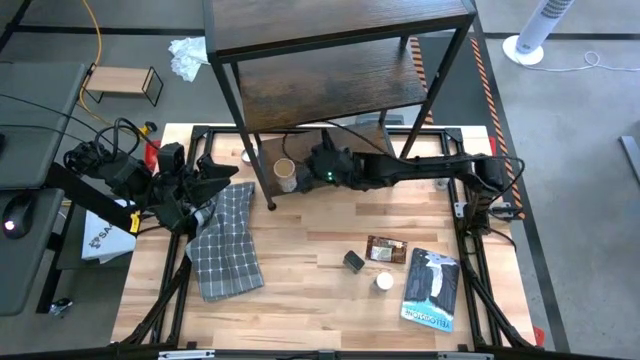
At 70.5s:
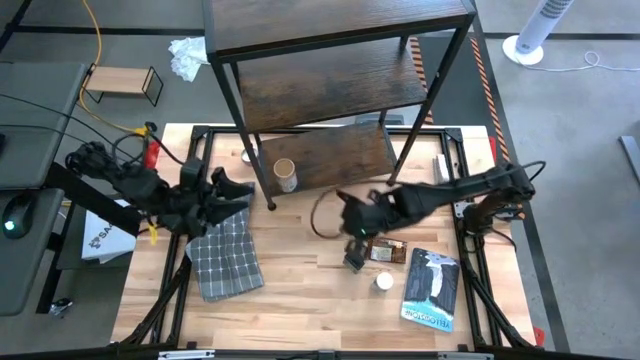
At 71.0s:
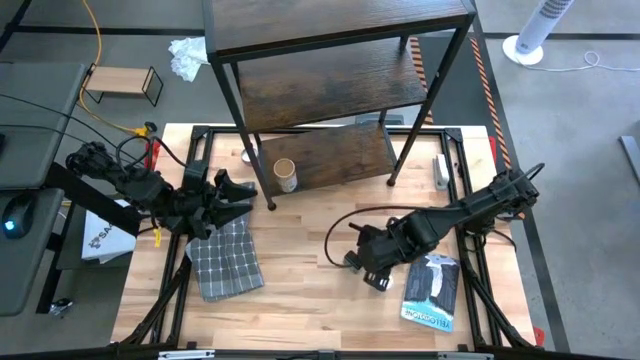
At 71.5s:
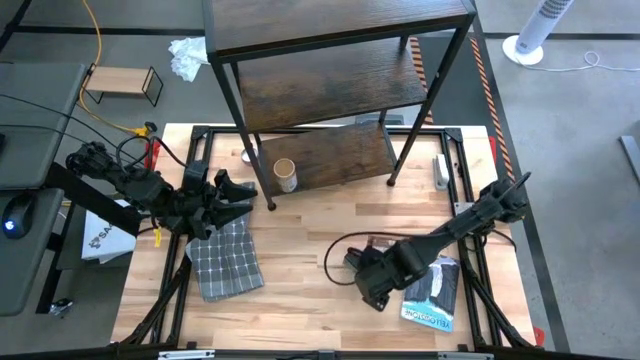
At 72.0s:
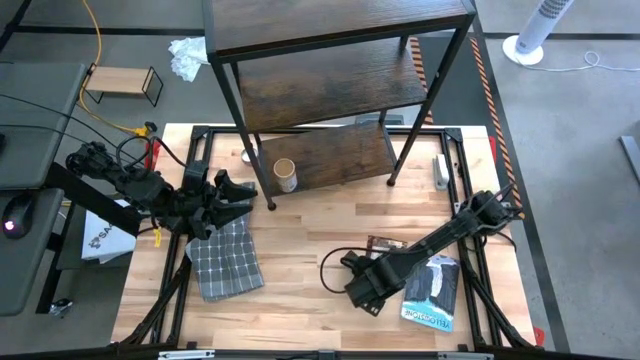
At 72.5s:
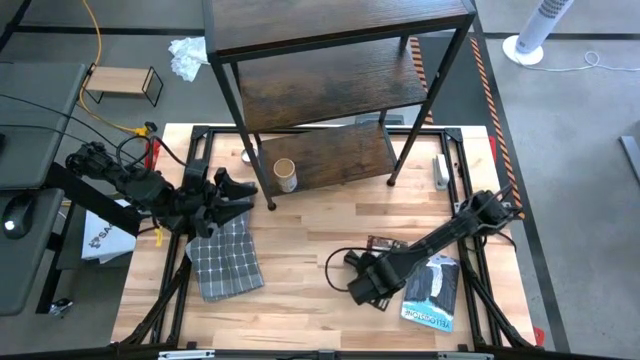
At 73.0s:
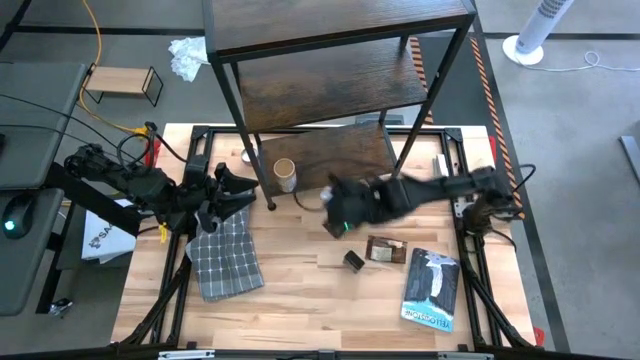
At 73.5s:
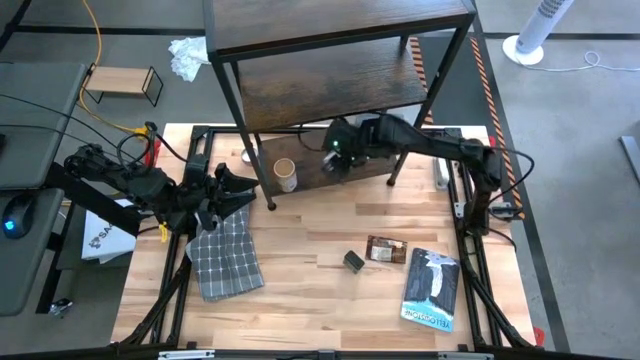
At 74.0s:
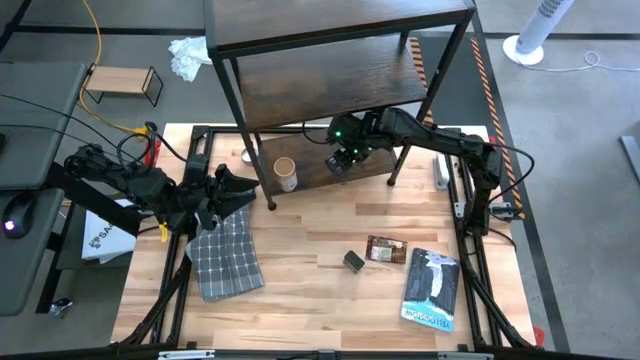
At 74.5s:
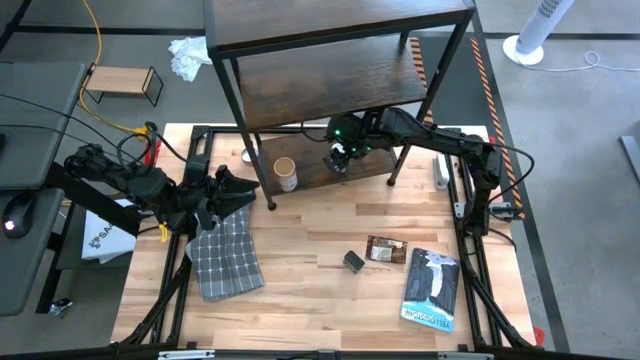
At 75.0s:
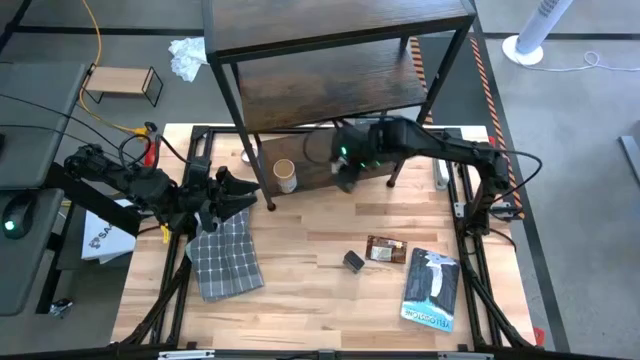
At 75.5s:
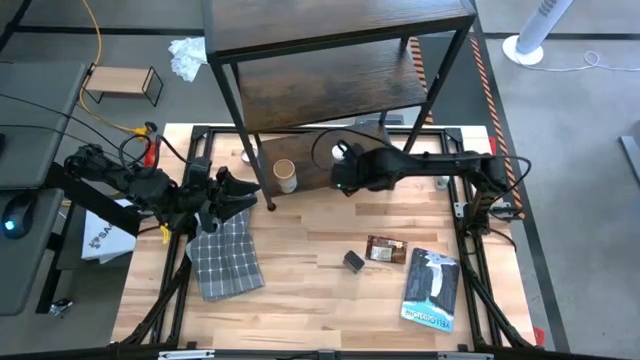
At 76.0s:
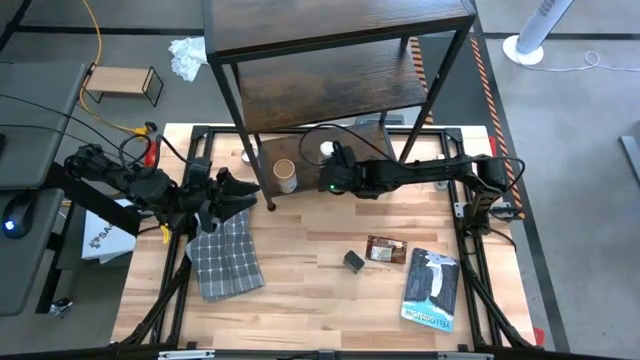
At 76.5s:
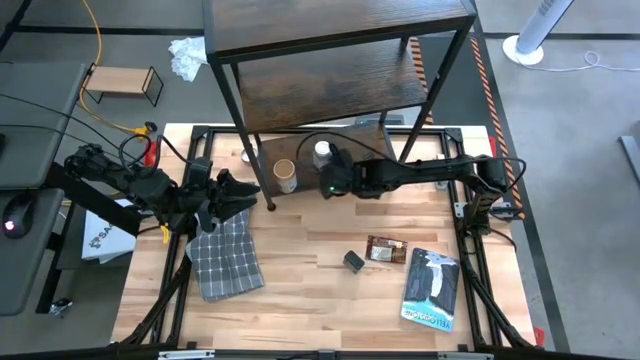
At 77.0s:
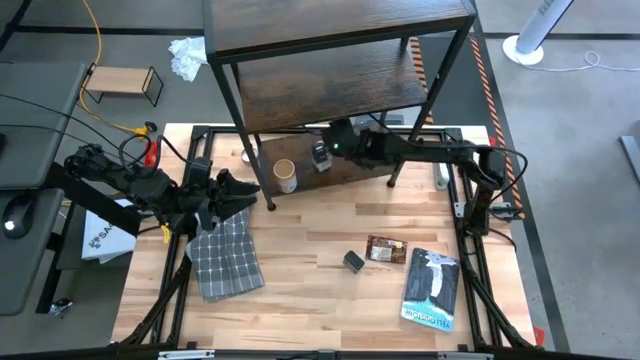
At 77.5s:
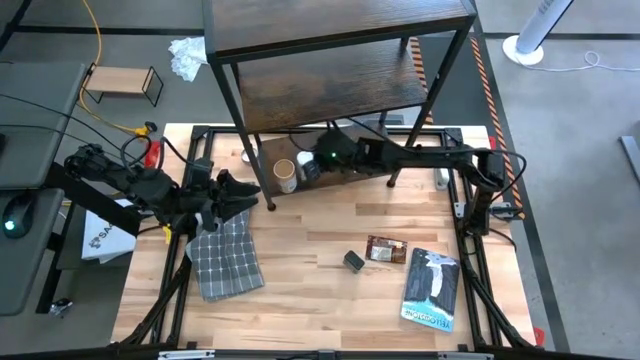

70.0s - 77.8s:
Task: Shelf spices
Put the white seasoning bottle on the shelf

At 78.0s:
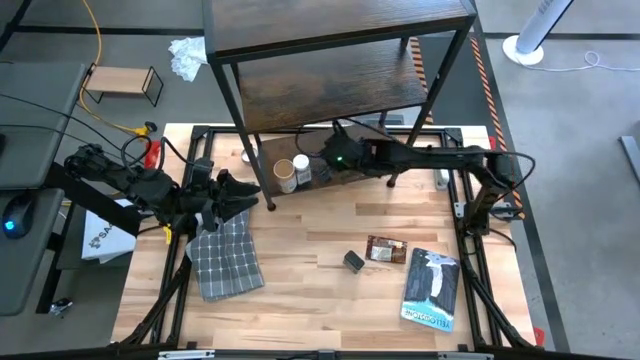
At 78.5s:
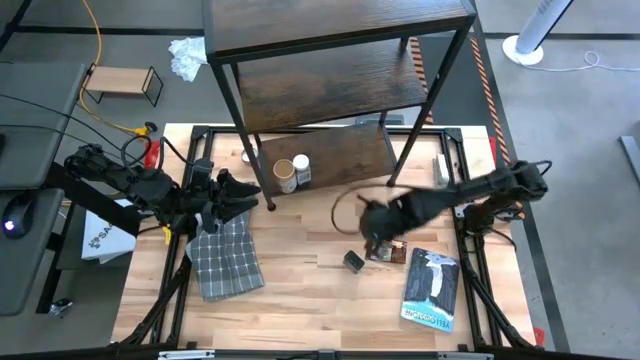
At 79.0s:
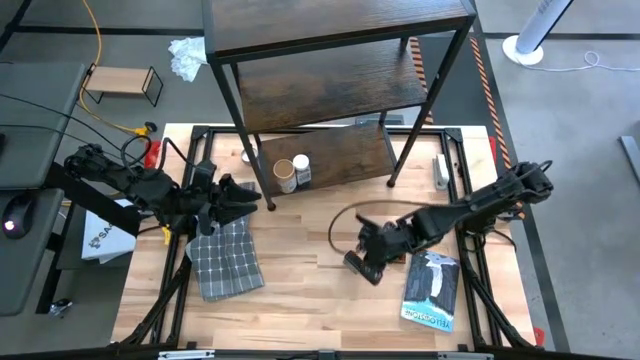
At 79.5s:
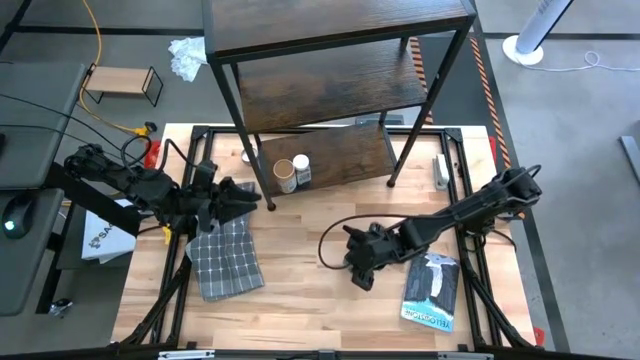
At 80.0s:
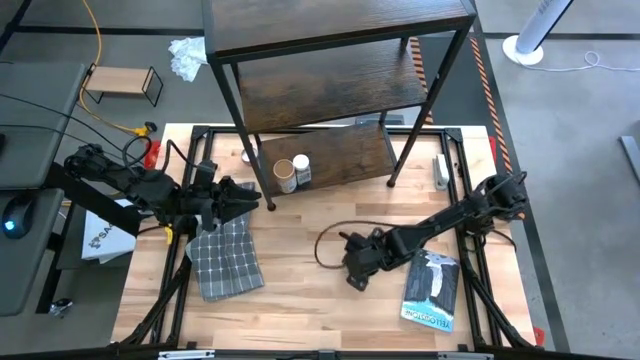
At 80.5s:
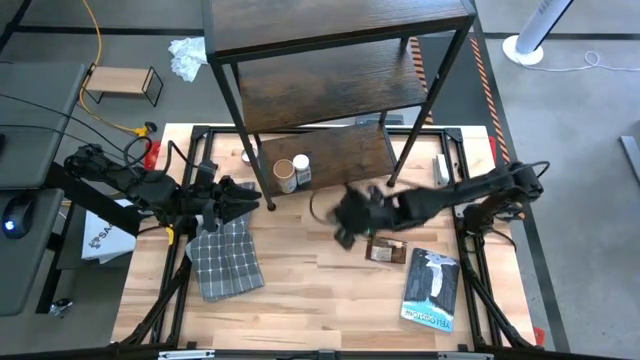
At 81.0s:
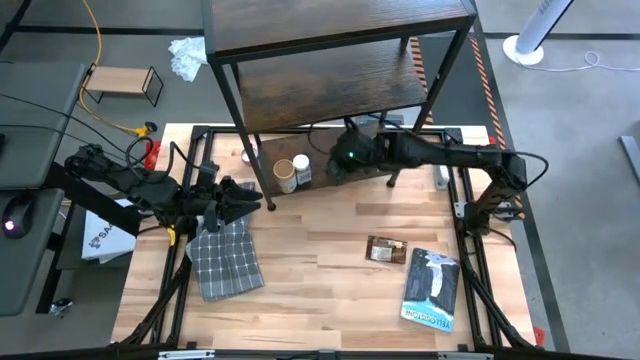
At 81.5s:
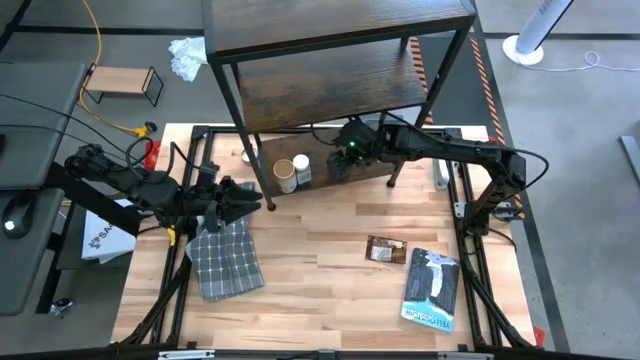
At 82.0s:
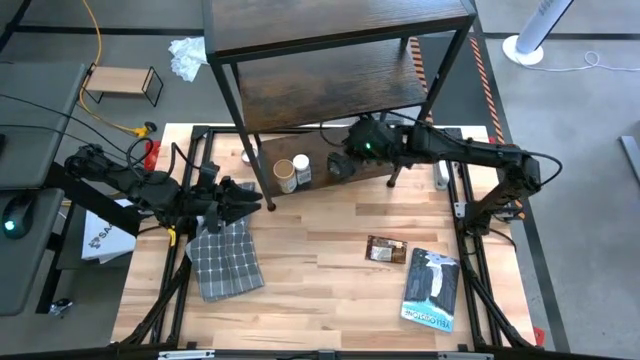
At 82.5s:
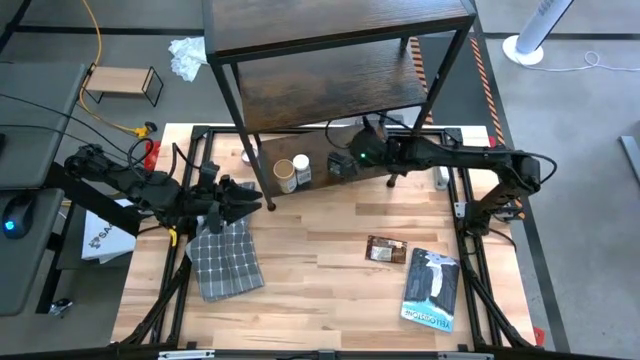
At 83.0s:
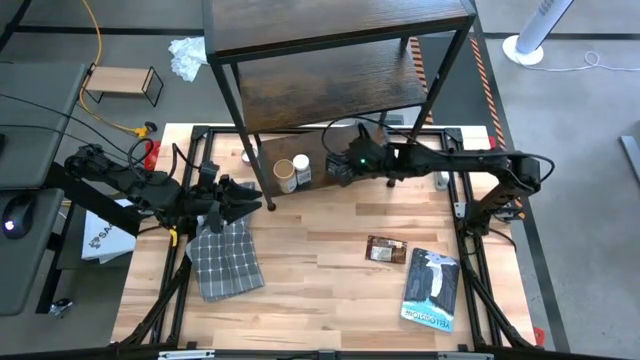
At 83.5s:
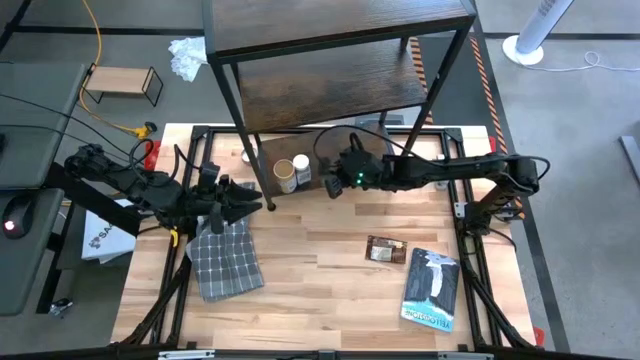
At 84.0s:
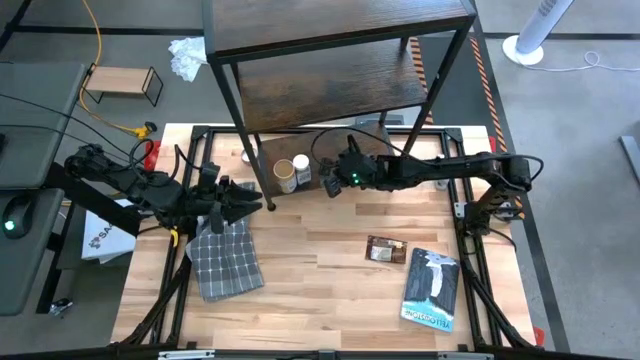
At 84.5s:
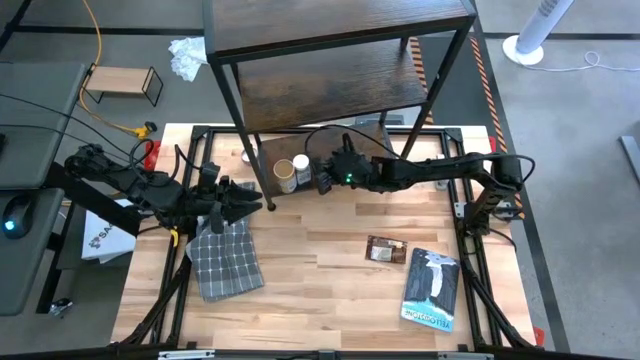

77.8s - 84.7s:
Put the green seasoning can on the shelf

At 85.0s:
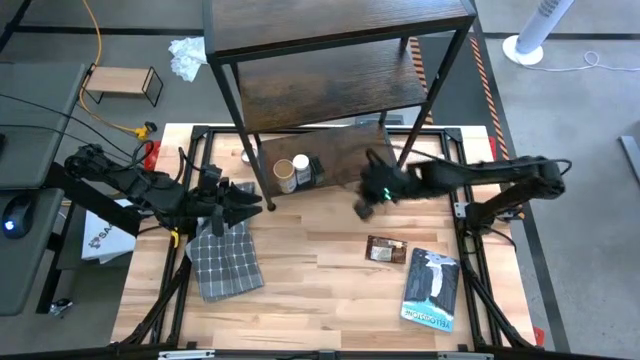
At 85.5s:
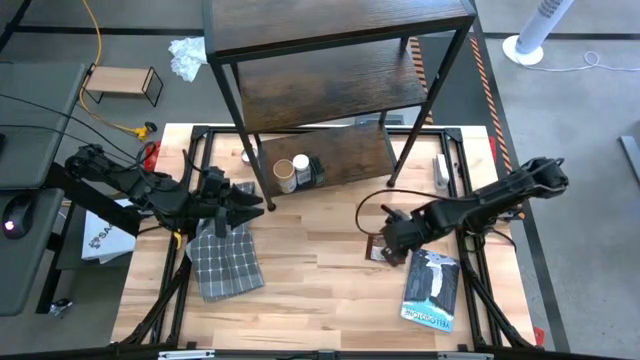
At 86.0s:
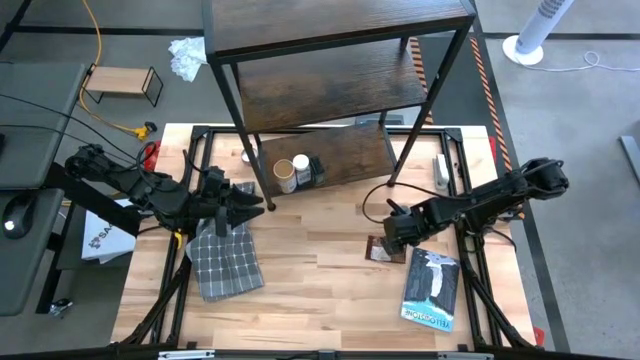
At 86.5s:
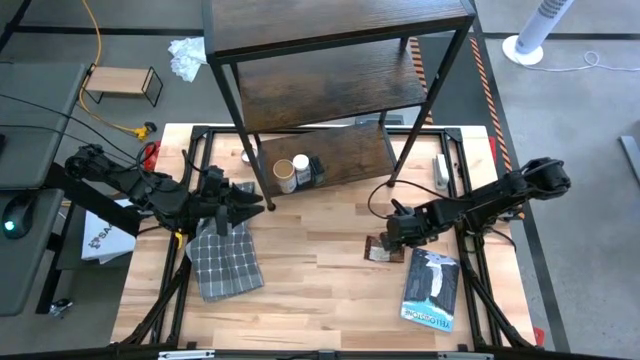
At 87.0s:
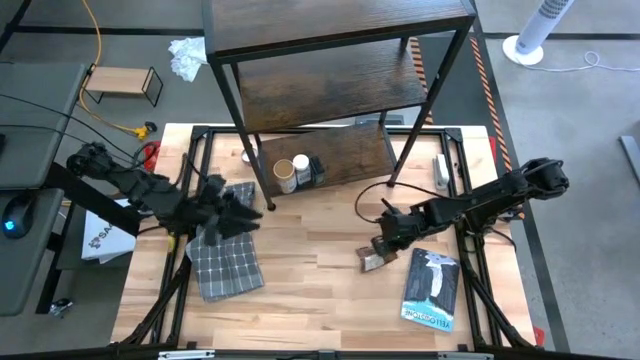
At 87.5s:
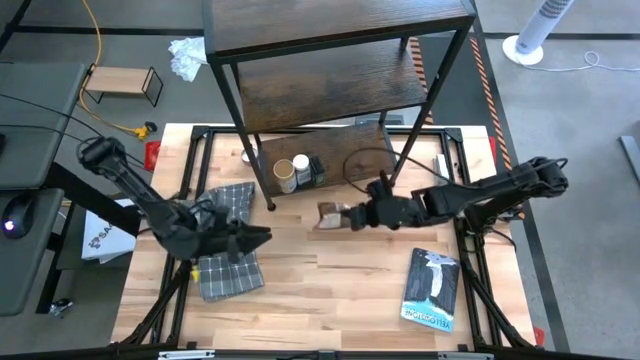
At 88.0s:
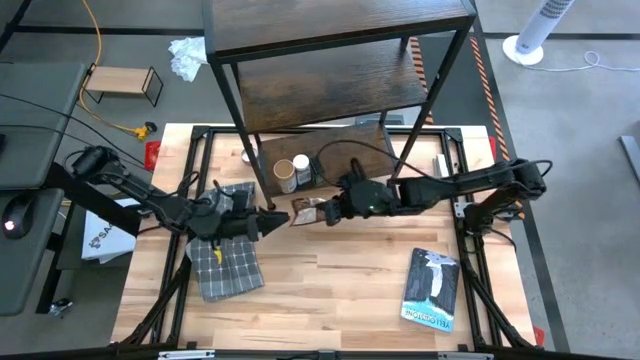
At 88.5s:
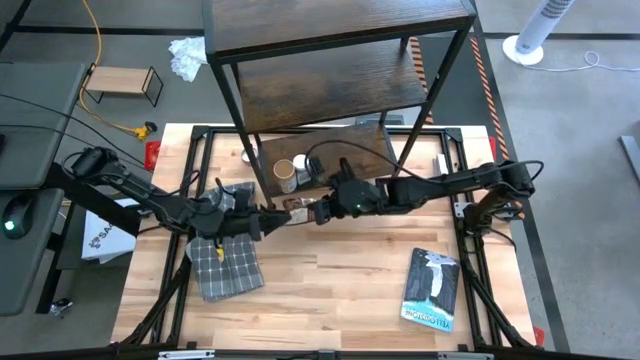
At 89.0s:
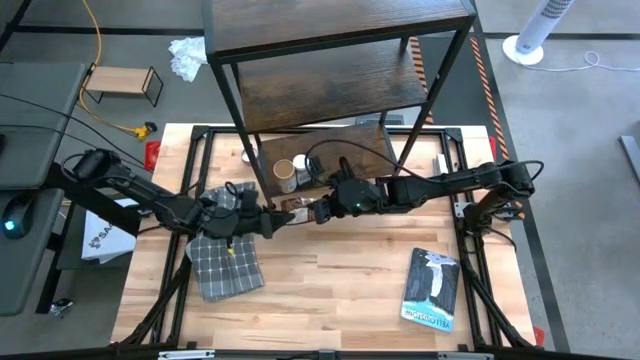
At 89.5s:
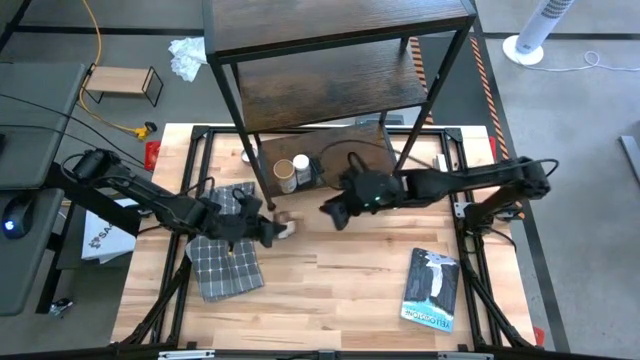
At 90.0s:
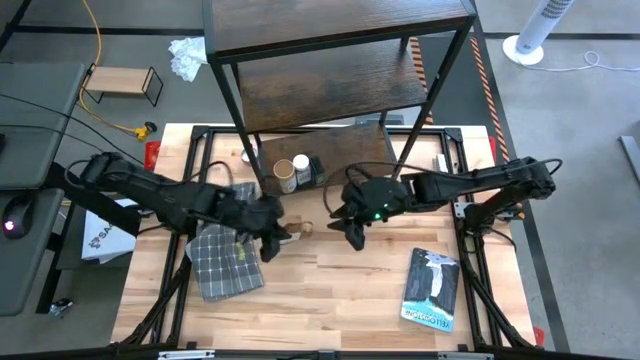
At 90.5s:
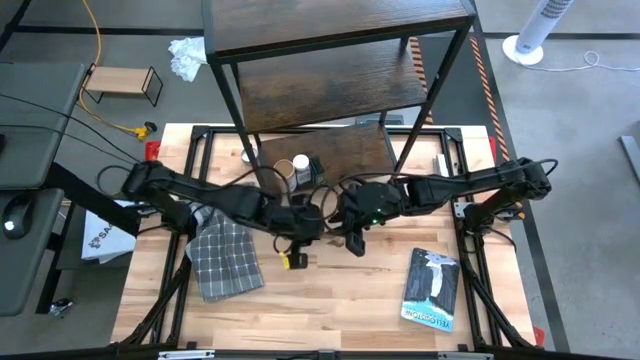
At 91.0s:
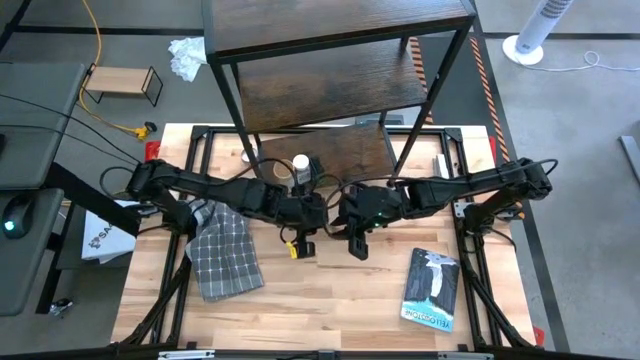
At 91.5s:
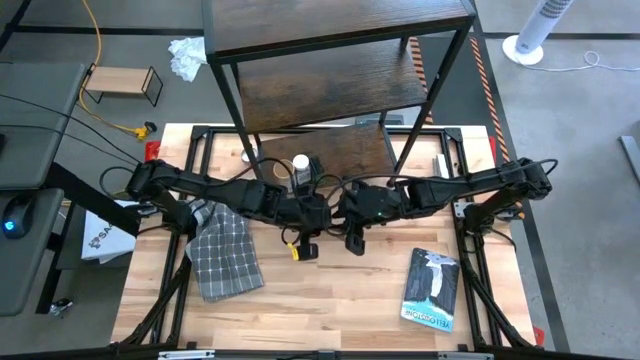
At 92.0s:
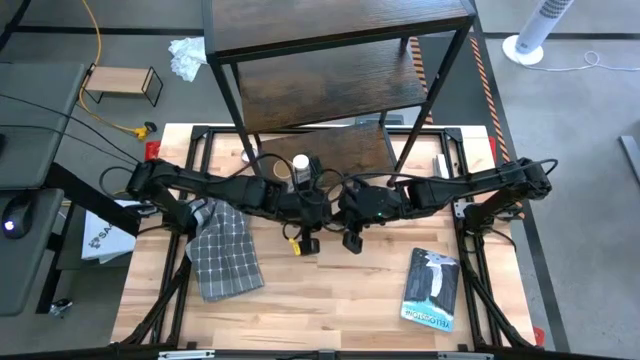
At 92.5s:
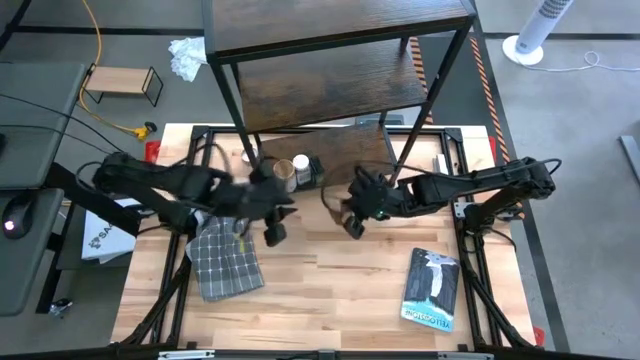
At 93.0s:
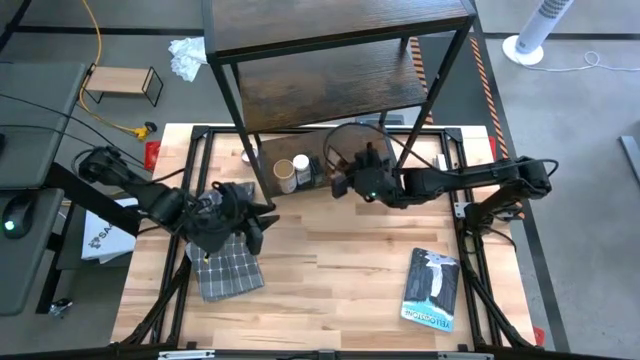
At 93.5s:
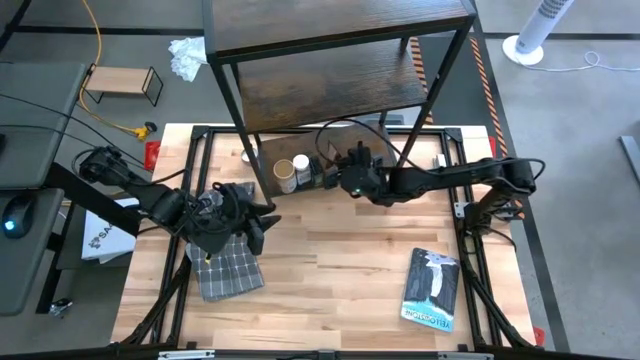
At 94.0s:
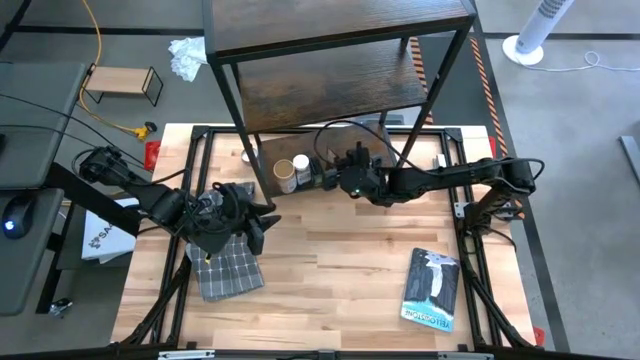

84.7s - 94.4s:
Put the orange seasoning bag on the shelf
